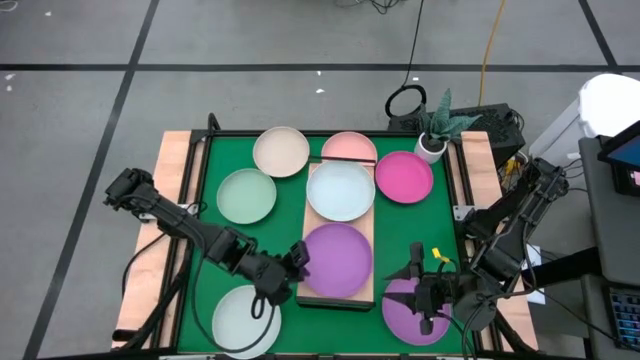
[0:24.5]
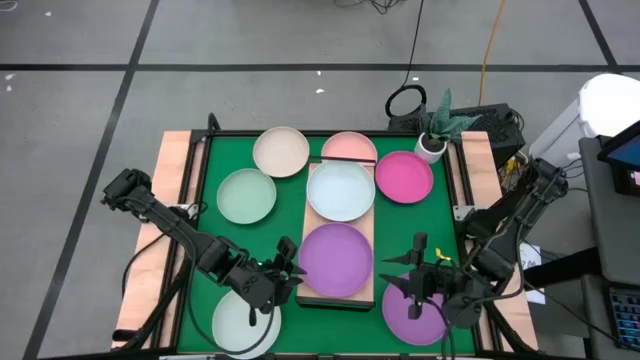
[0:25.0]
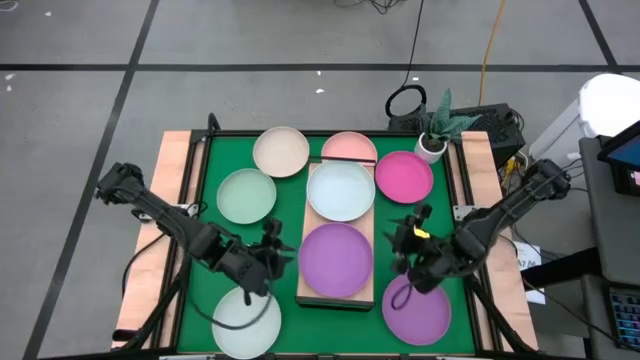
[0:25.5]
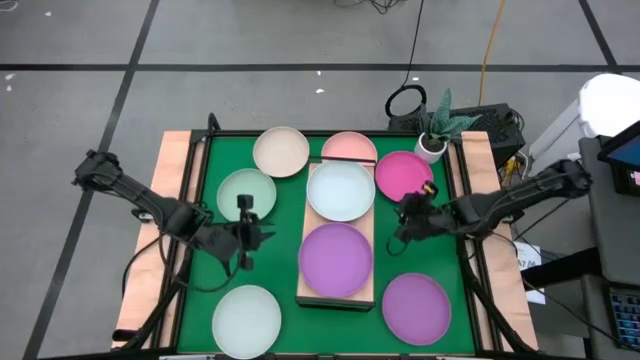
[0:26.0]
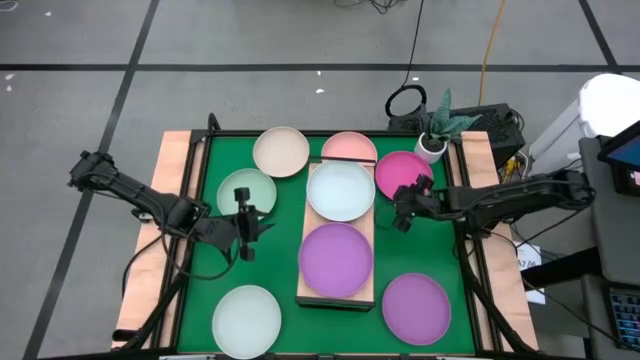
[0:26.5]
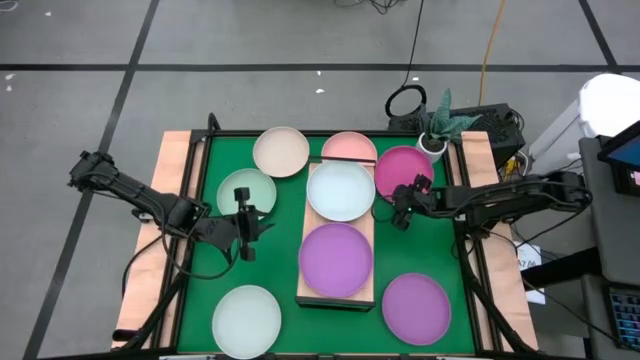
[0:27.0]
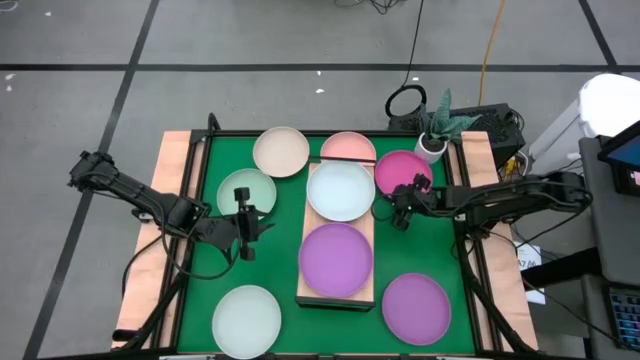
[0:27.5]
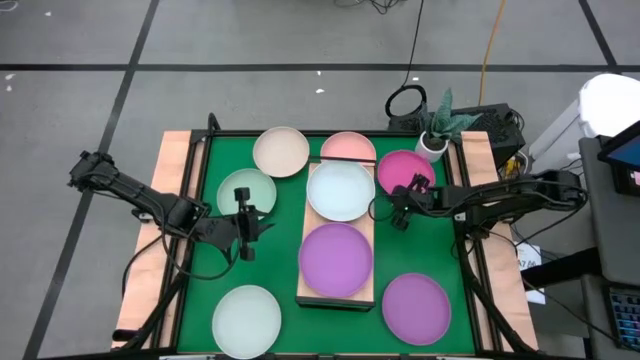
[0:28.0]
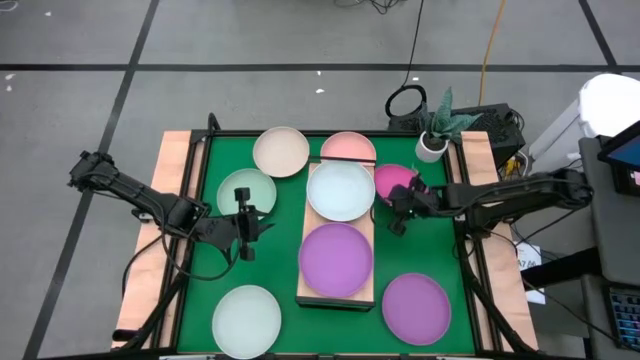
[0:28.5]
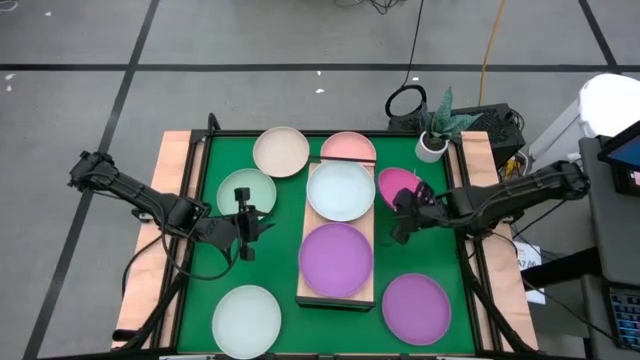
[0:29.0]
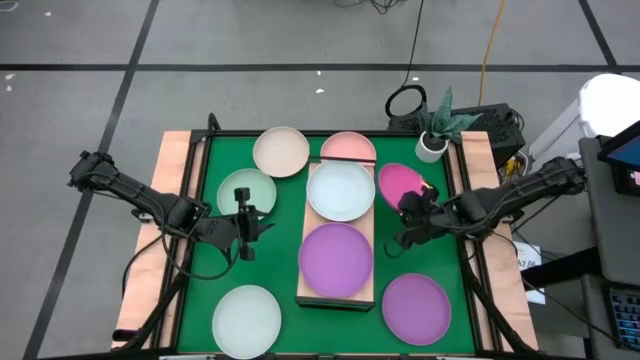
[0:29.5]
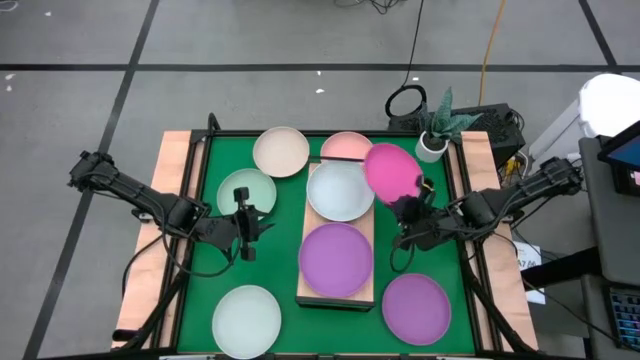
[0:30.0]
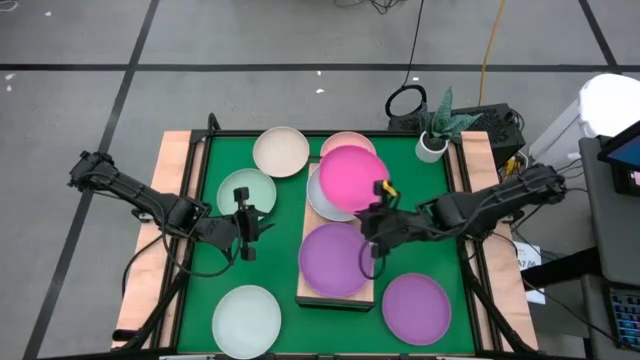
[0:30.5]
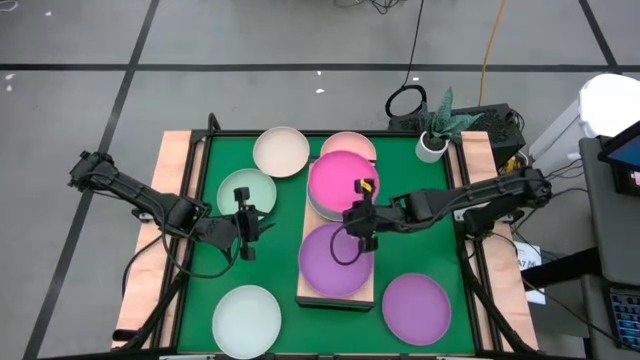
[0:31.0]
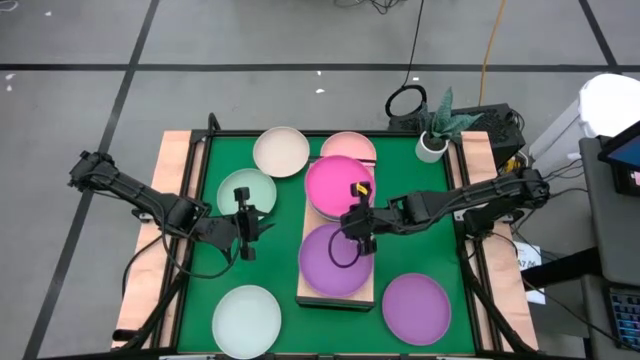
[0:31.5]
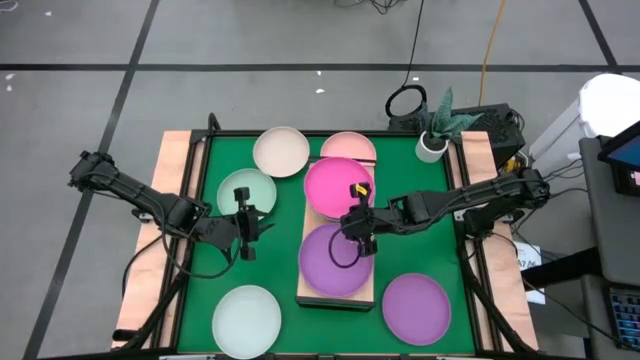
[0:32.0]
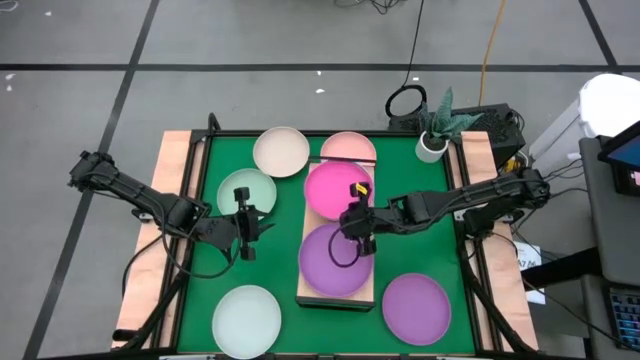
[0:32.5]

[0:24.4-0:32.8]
Task: Place and stack plates onto a shelf
Stack the pink plate on top of the gray plate on the shelf

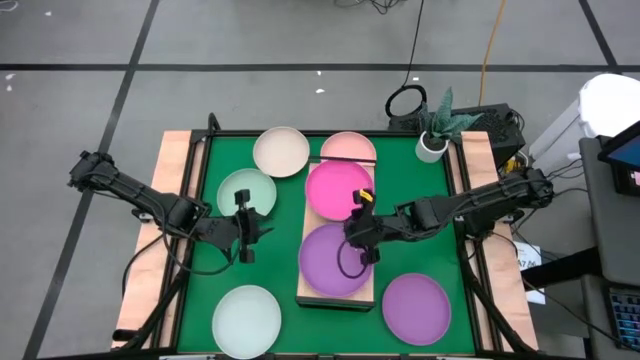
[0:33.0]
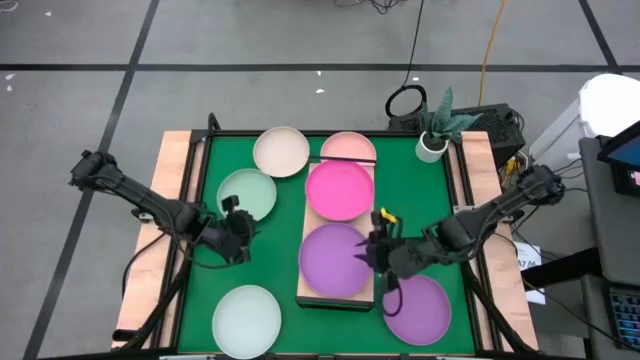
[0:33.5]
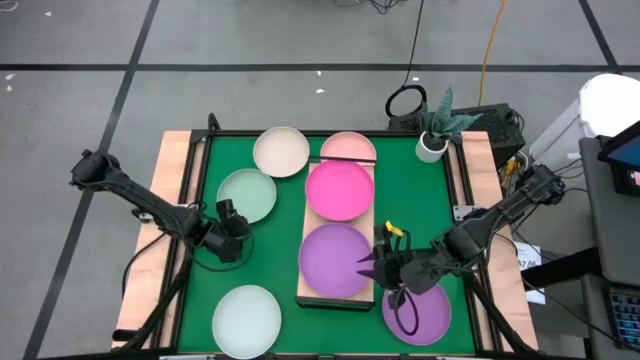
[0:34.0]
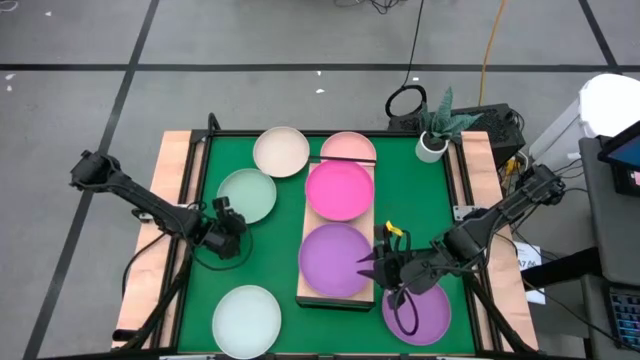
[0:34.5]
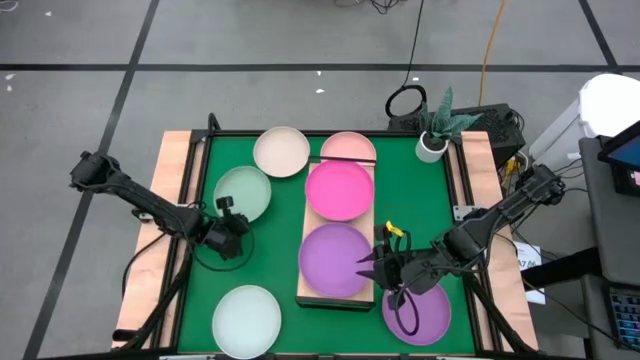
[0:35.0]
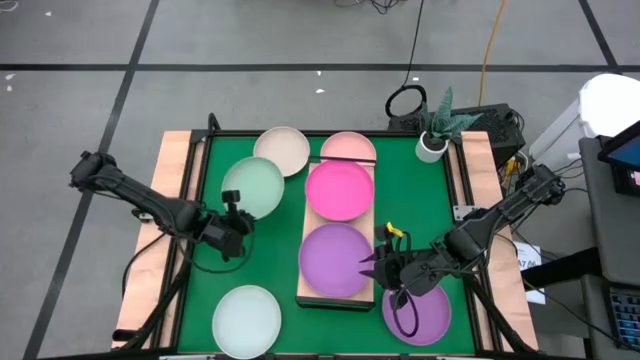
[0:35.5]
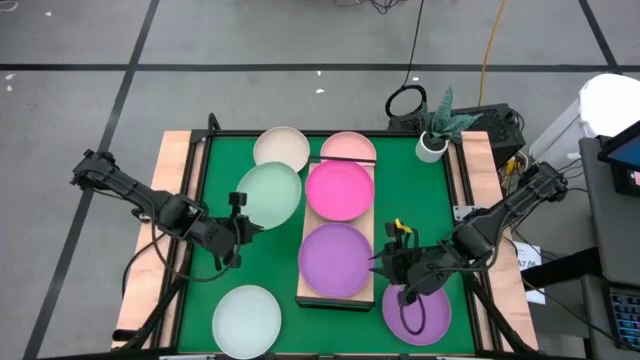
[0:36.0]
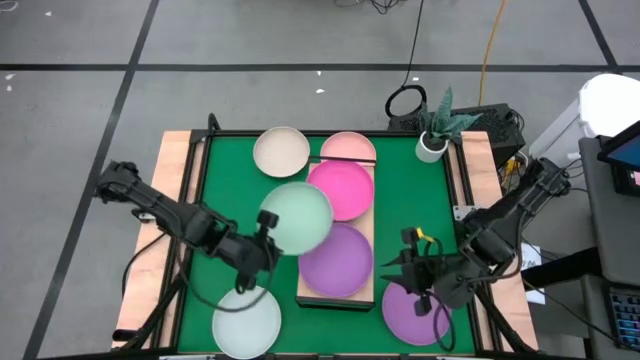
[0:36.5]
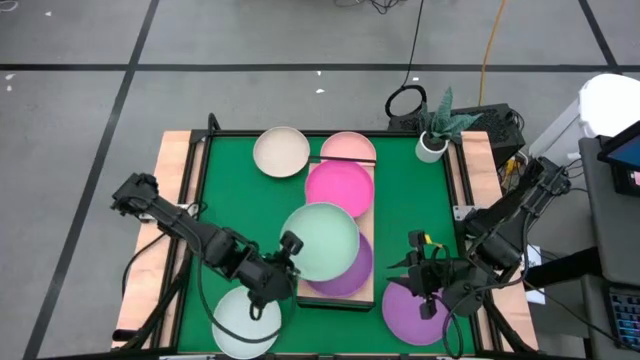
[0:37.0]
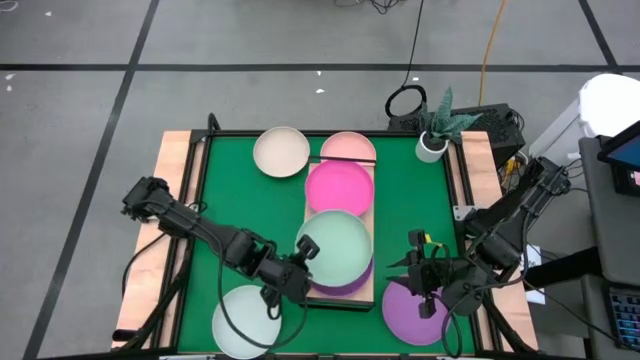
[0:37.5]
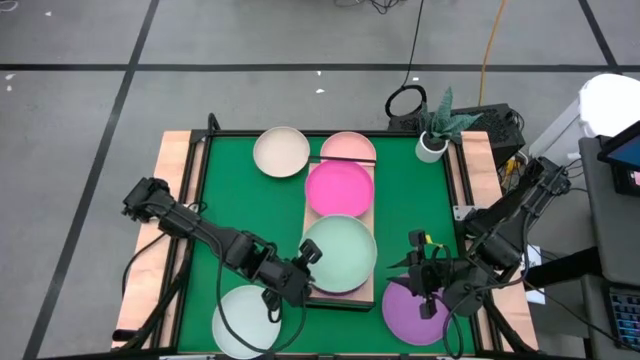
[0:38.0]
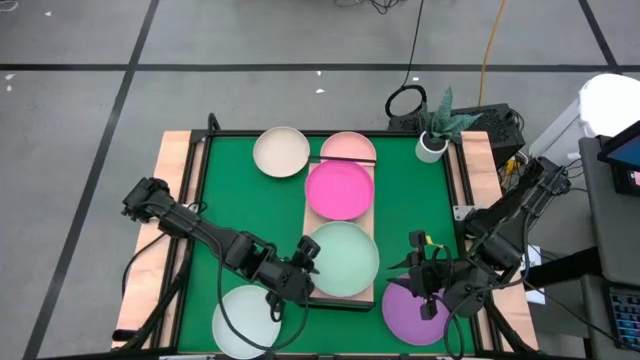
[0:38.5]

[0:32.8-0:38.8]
Stack the light green plate on top of the purple plate on the shelf

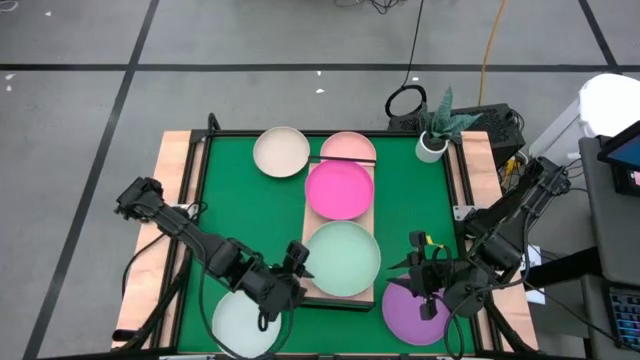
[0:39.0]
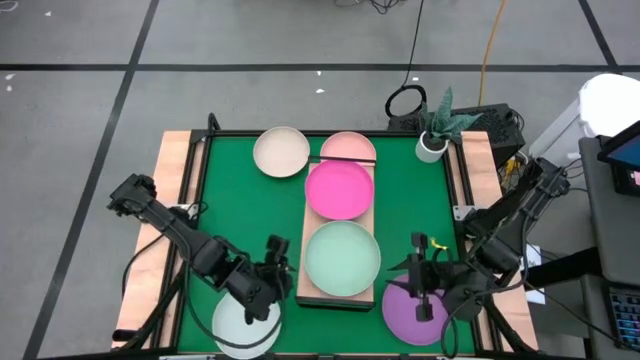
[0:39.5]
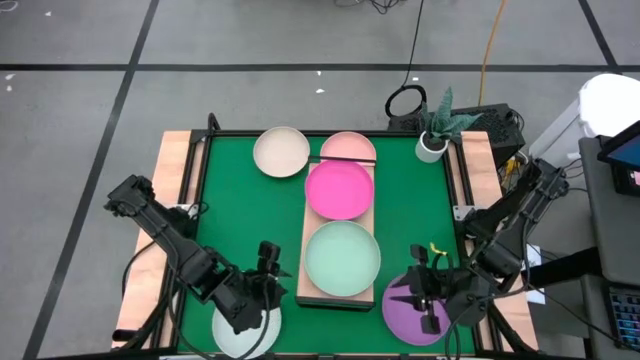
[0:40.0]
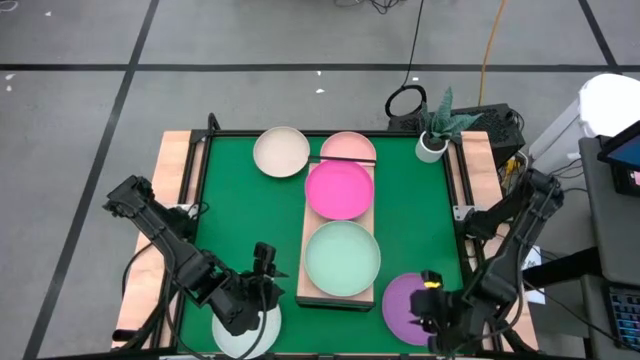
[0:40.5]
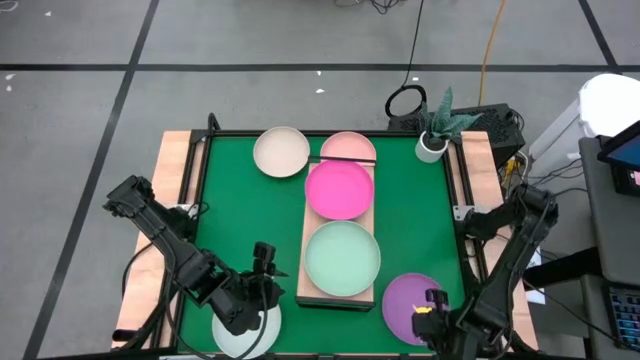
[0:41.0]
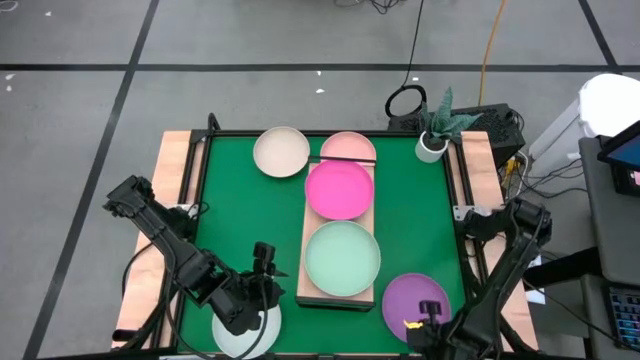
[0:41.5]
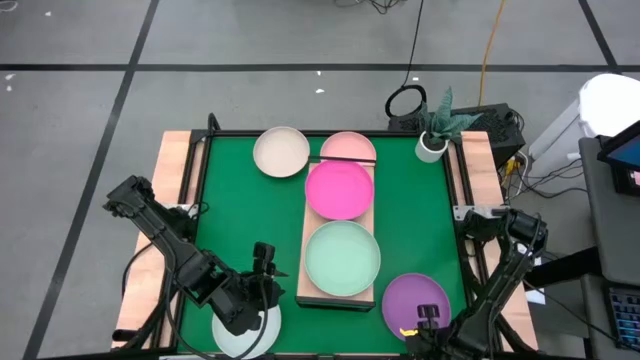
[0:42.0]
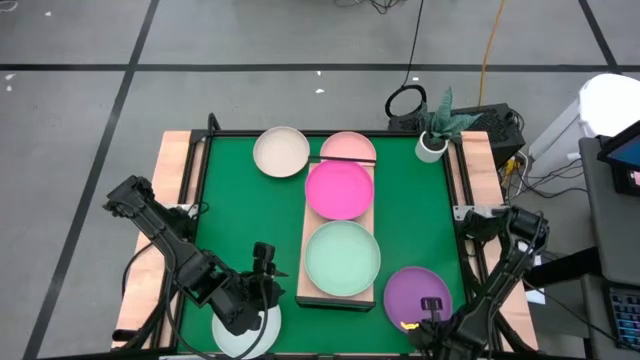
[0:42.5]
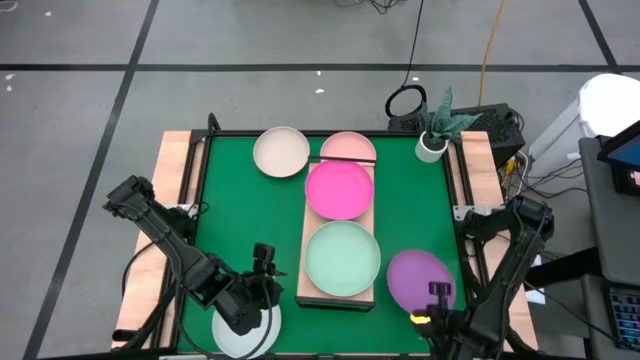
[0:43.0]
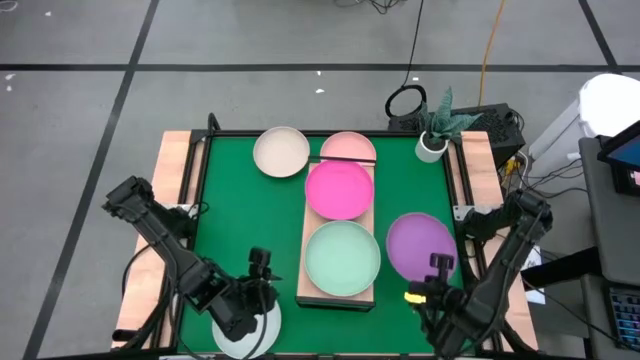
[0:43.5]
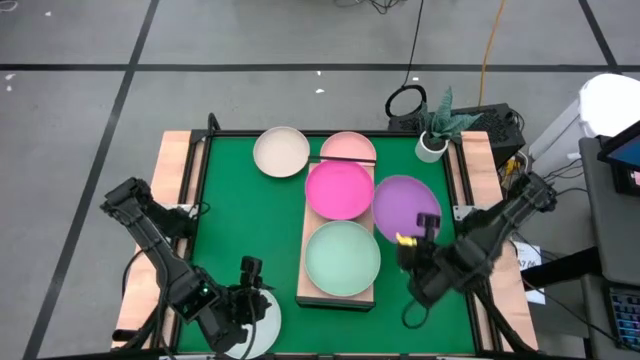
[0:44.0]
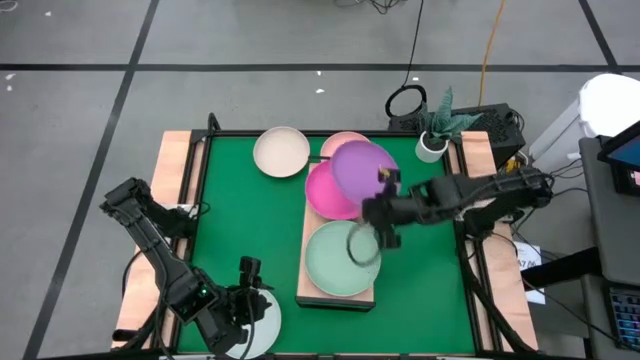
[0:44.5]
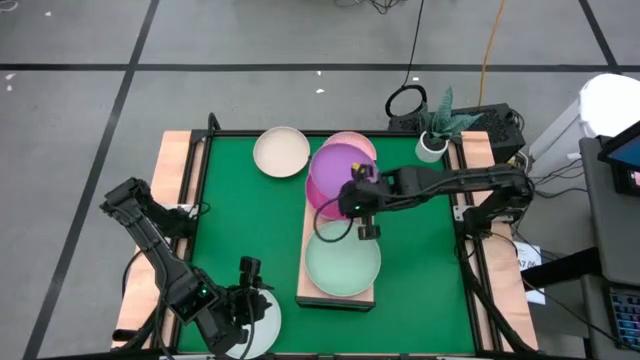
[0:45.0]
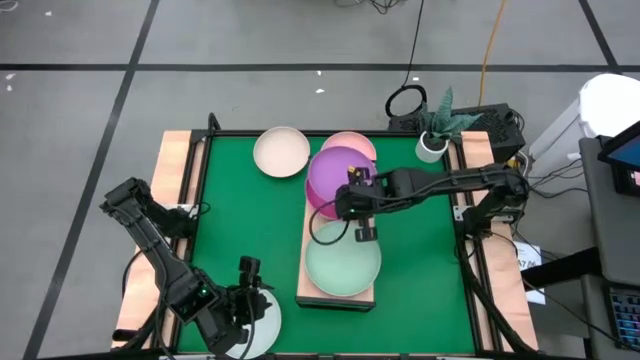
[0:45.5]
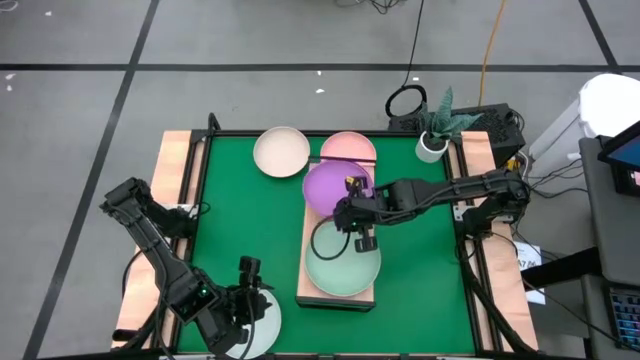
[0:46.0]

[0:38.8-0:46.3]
Stack the purple plate on top of the pink plate on the shelf
